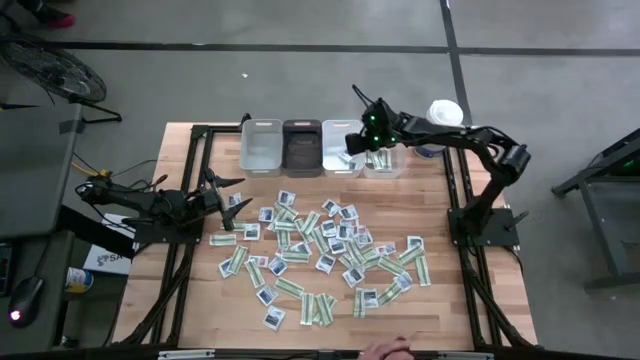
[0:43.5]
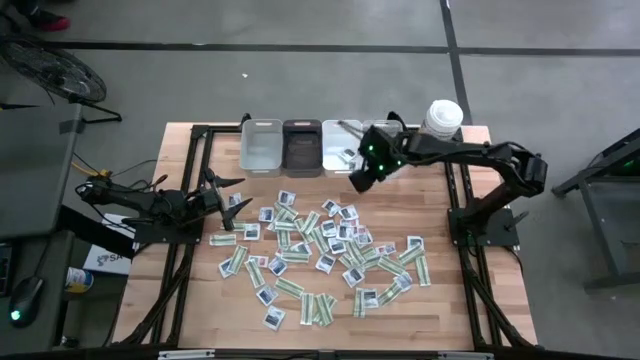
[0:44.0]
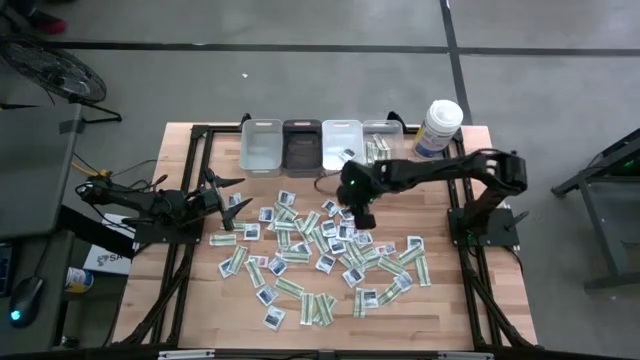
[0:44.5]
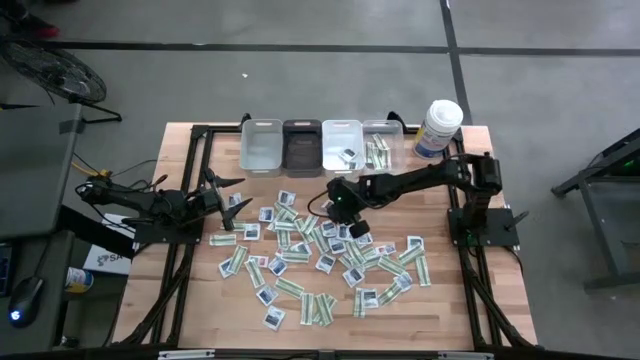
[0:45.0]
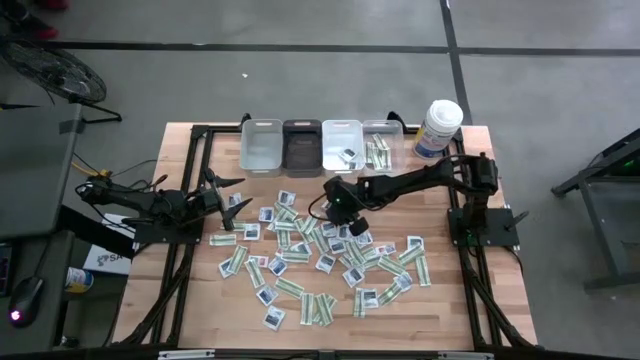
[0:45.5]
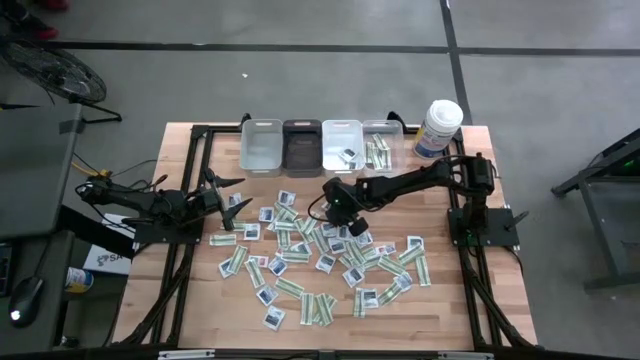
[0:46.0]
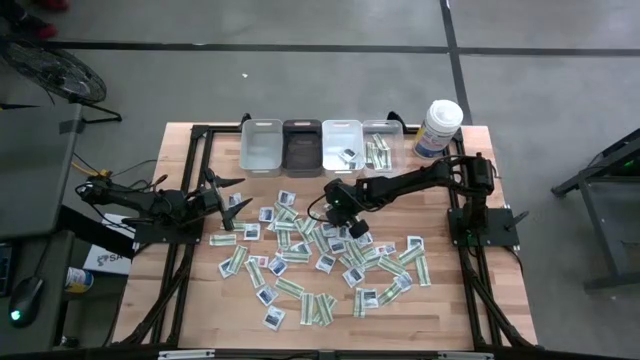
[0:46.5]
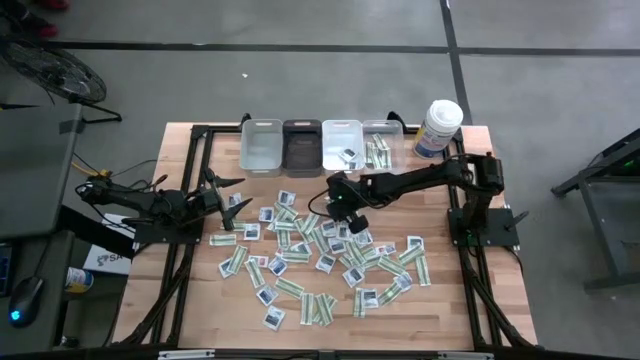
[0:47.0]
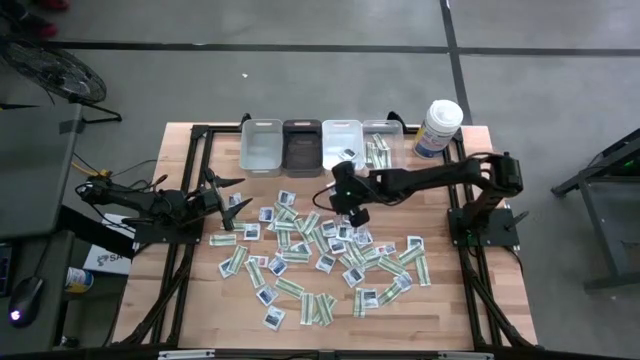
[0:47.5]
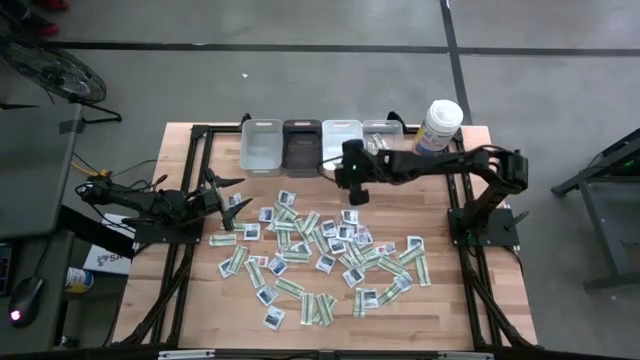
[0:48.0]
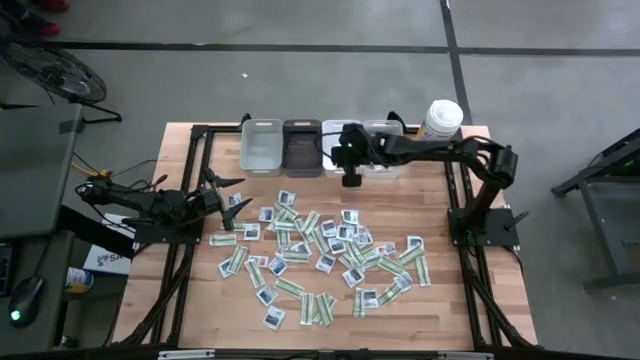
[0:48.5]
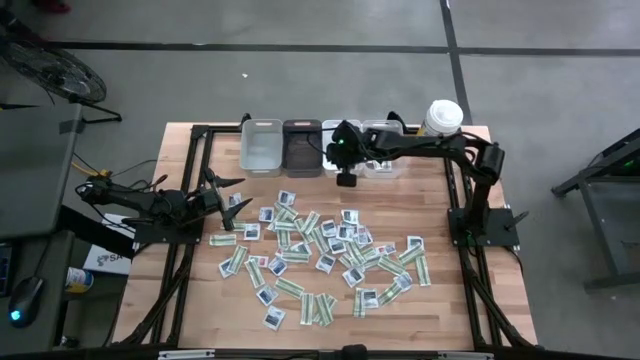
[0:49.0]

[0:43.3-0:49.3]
Task: Pick & Place First Aid Supplies
Put the black towelette pack into the white bin

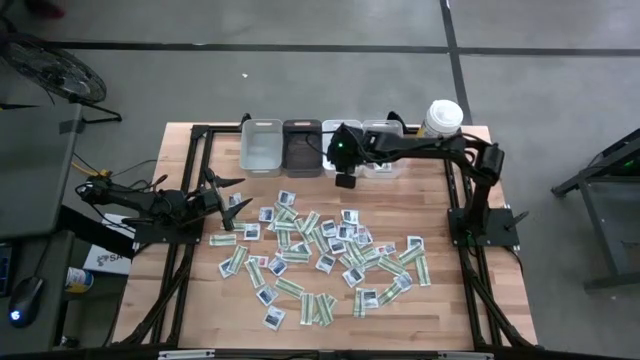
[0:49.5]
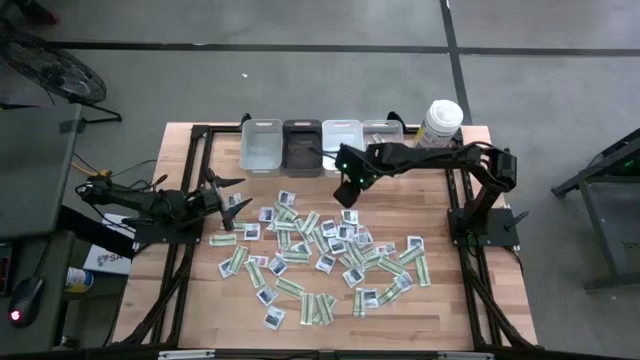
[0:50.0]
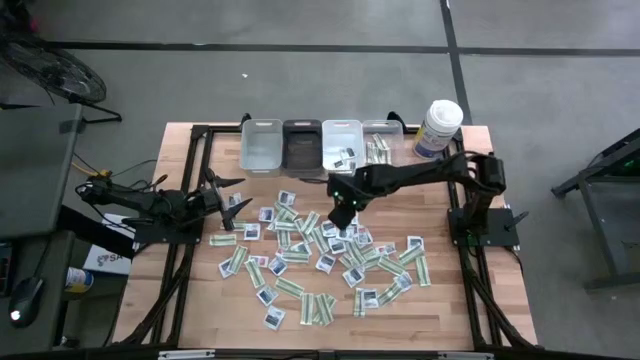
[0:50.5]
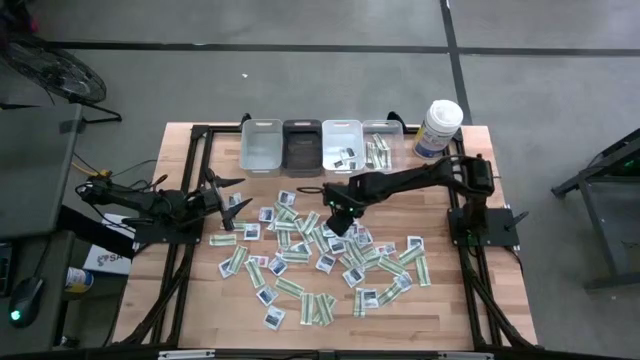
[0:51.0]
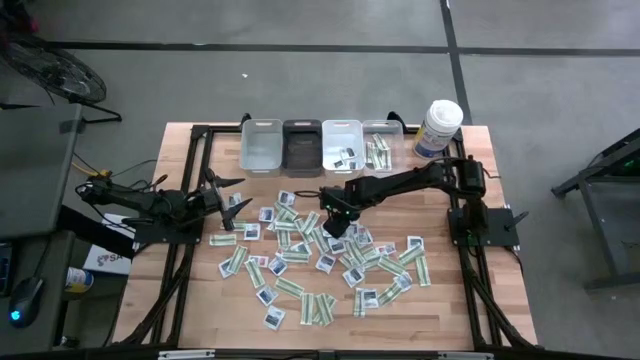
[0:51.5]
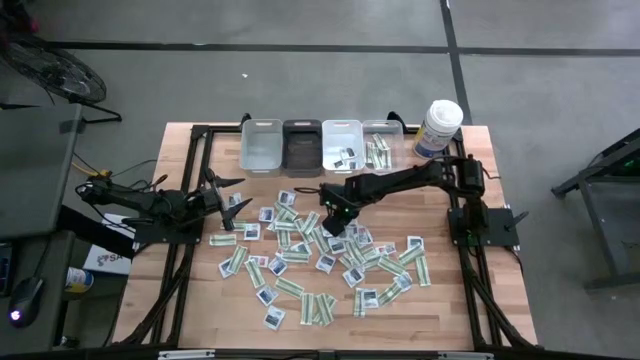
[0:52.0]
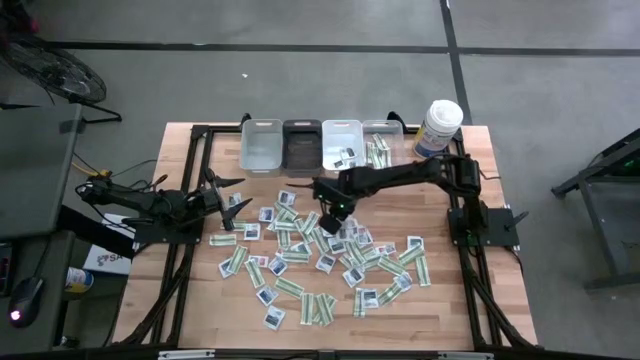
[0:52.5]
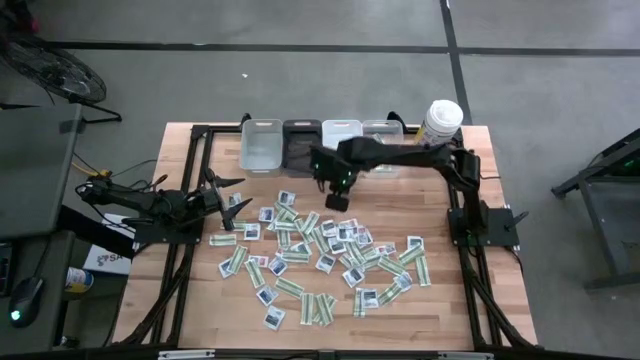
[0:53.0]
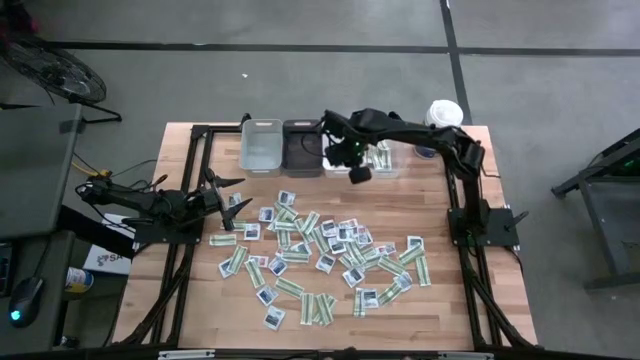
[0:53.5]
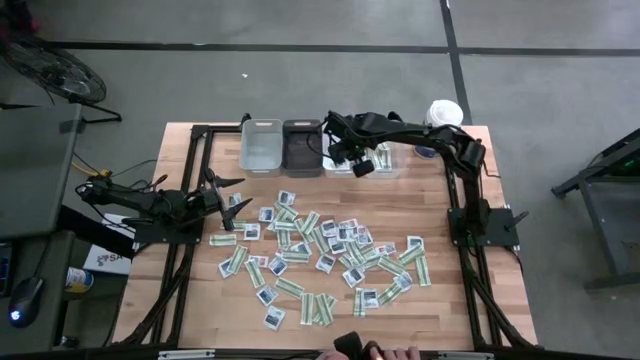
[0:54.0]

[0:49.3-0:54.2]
Put the black towelette pack into the white bin

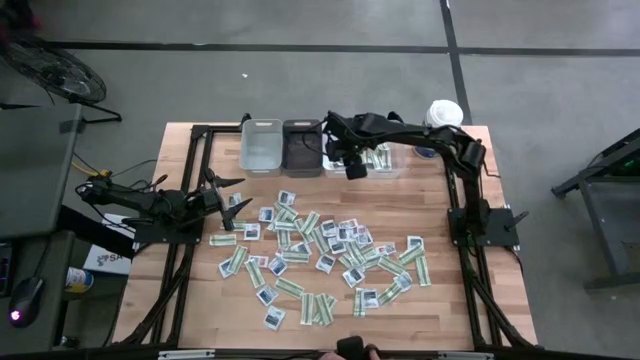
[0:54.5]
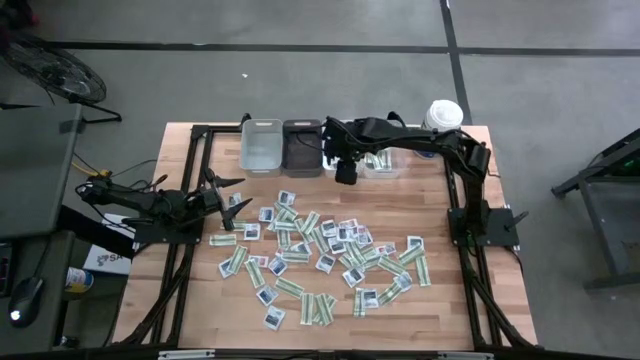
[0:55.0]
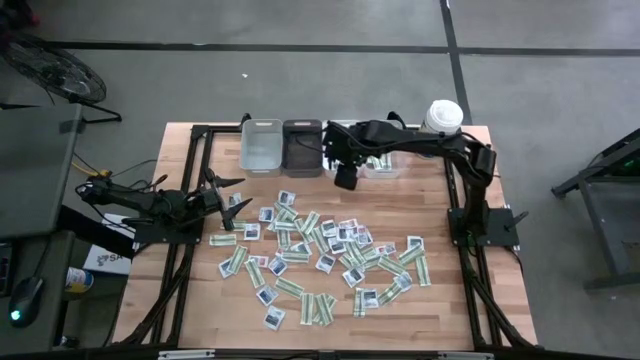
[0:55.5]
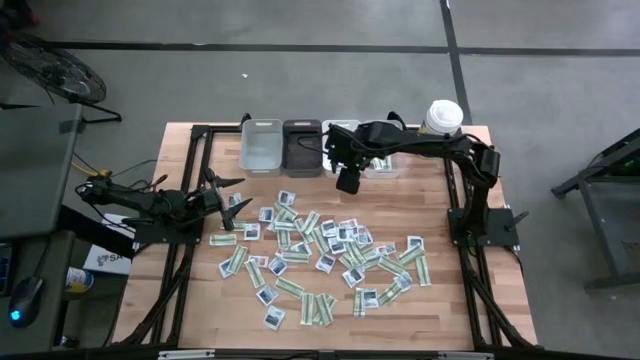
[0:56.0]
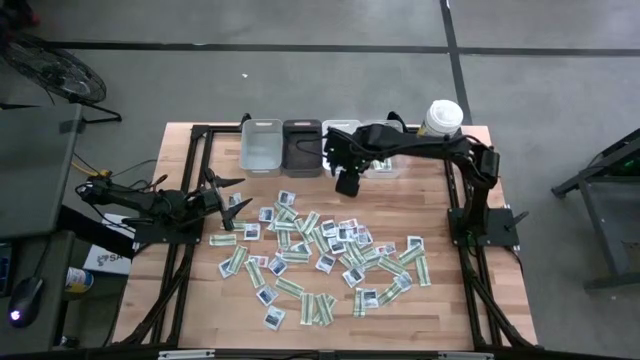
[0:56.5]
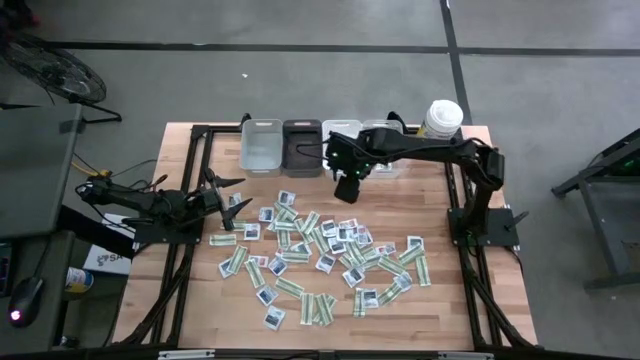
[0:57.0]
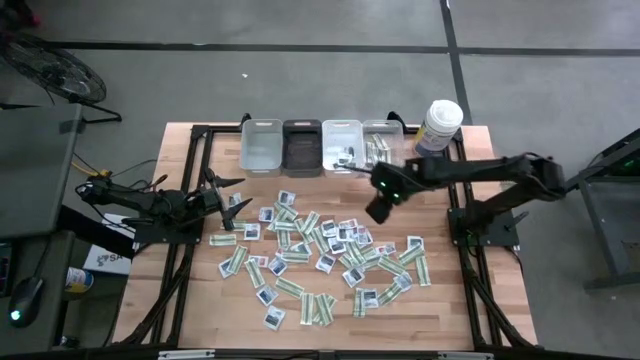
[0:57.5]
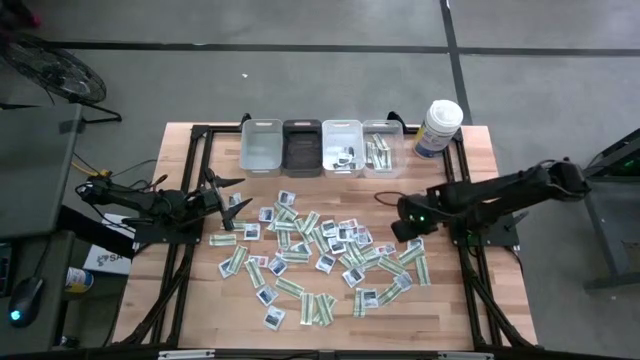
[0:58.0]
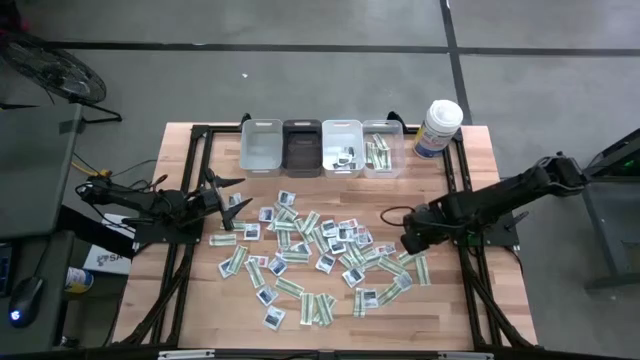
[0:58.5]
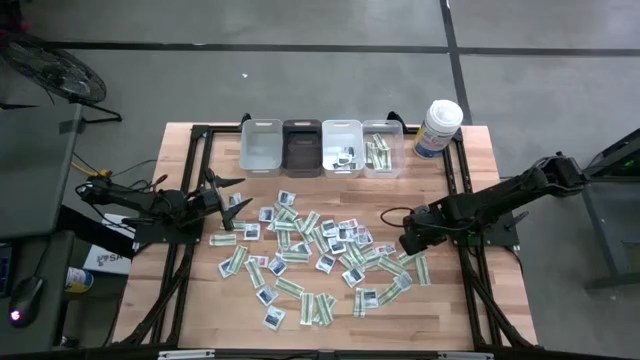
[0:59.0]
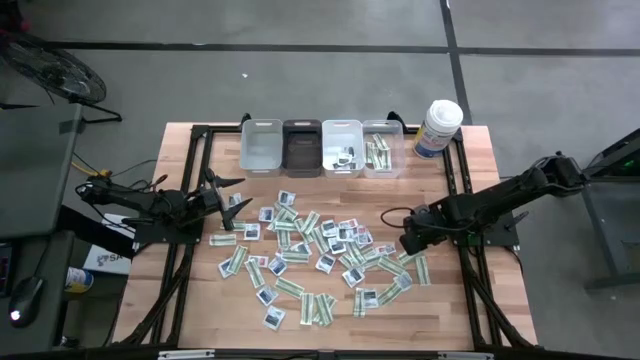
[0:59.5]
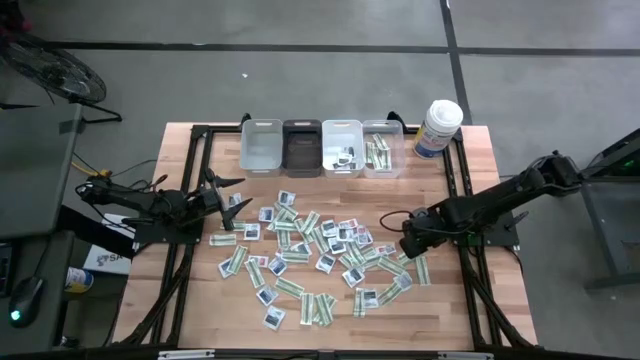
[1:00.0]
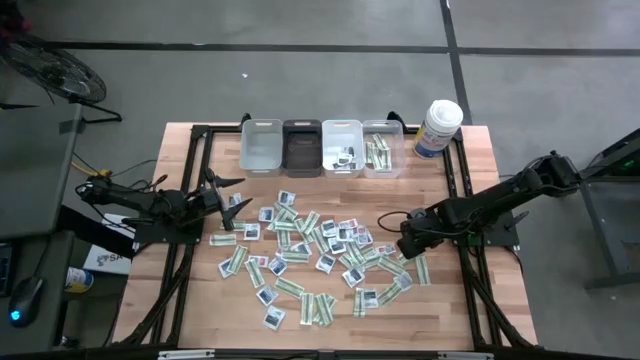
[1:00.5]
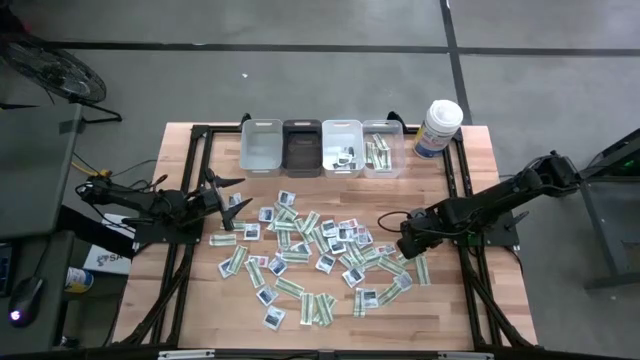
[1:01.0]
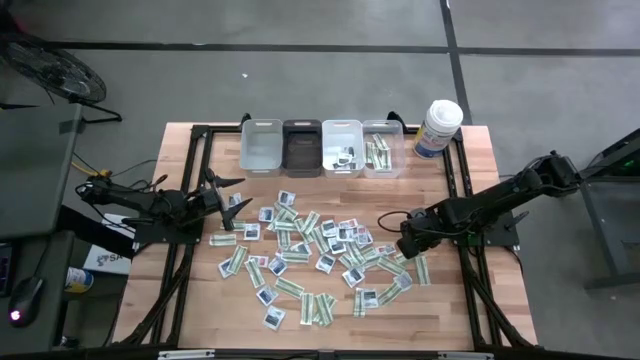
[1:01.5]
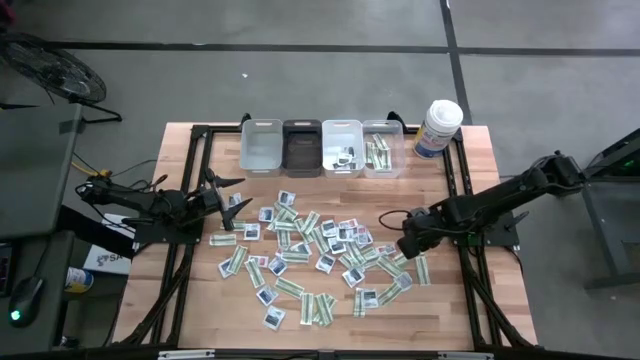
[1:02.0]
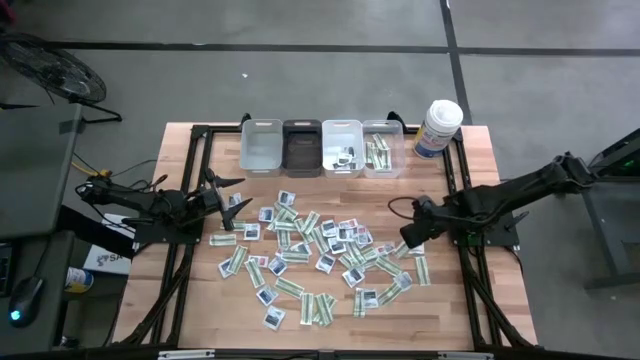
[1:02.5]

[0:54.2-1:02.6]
Put the green bandage into the transparent bin

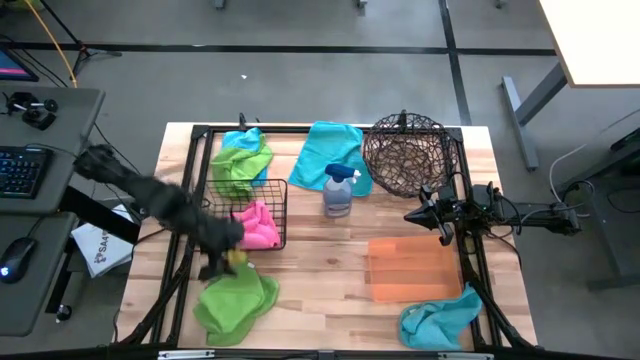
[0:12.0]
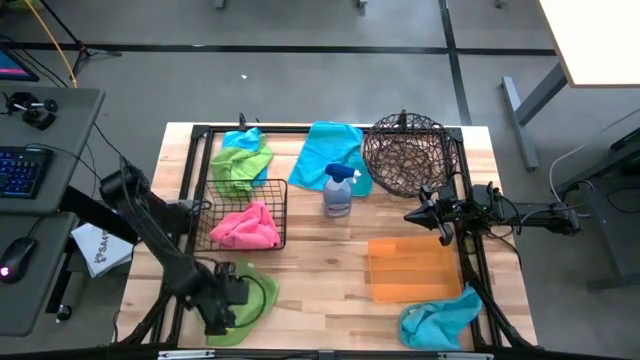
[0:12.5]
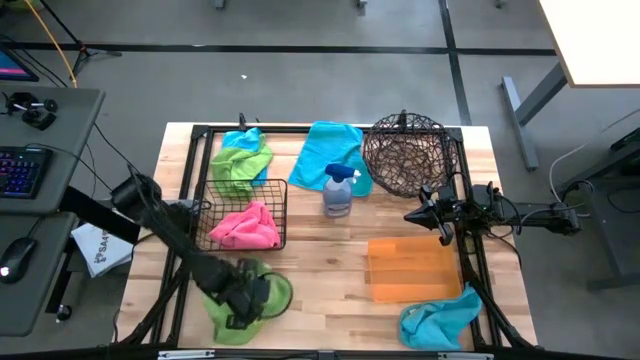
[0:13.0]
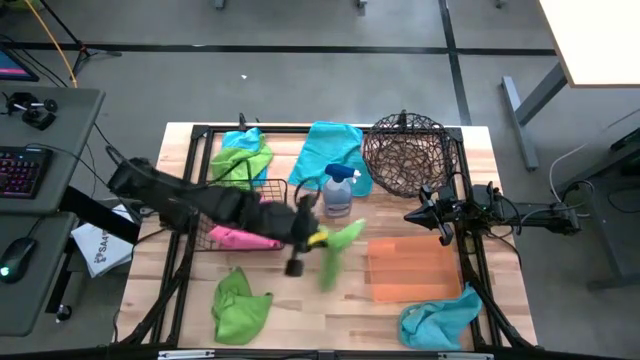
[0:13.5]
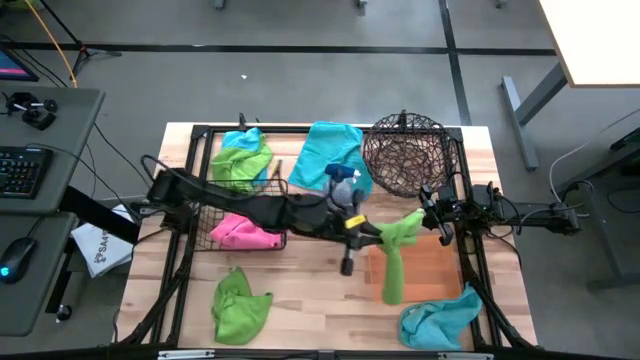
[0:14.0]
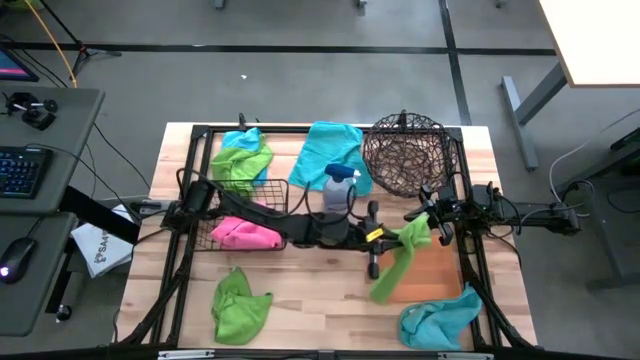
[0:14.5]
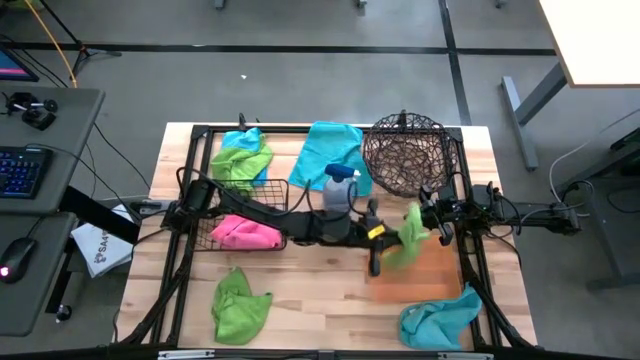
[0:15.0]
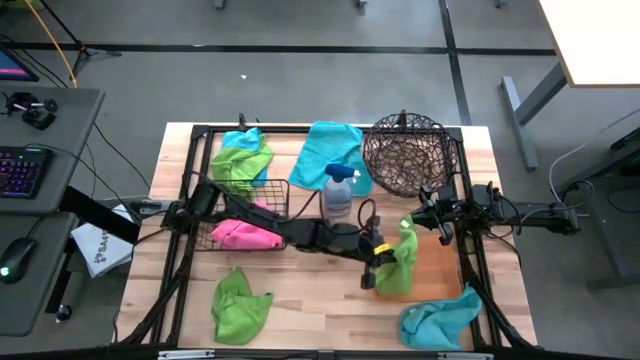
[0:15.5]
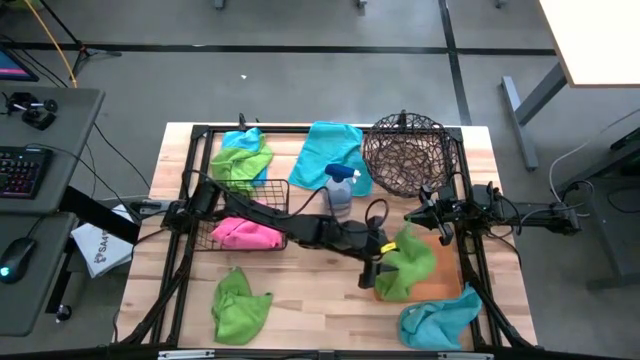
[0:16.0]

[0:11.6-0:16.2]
Task: Sort microfiber towel by color & place in baskets
Put the bottom green microfiber cloth into the orange bin
